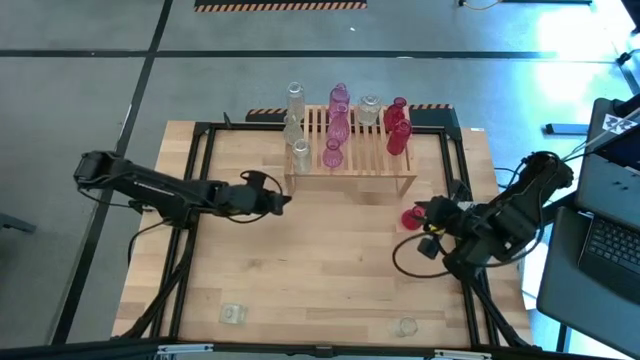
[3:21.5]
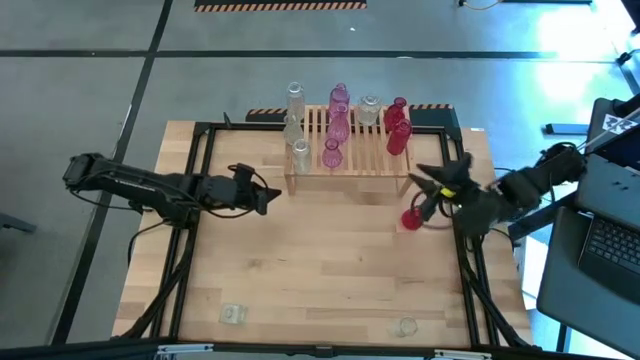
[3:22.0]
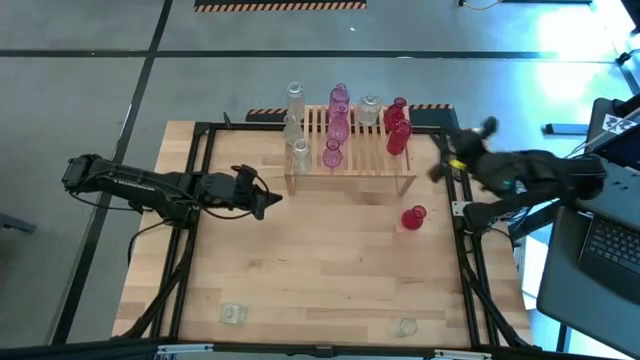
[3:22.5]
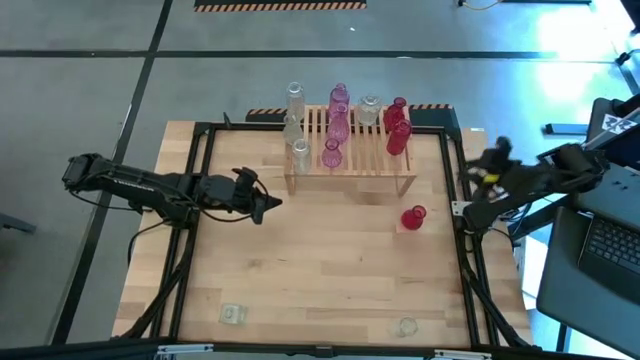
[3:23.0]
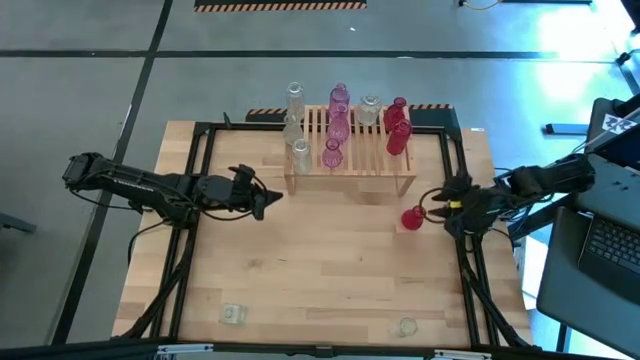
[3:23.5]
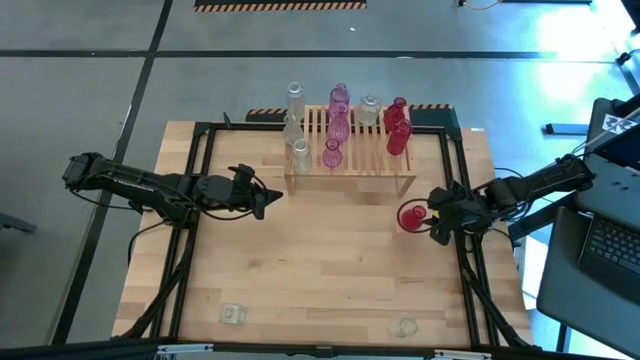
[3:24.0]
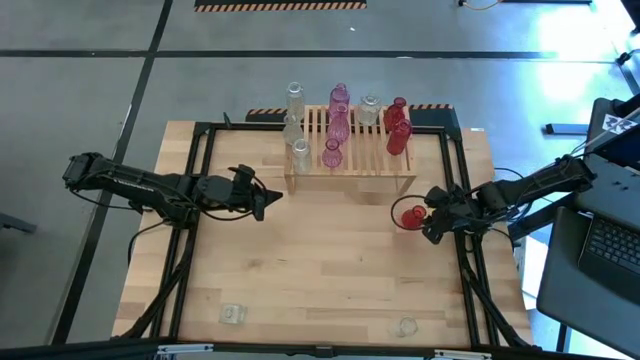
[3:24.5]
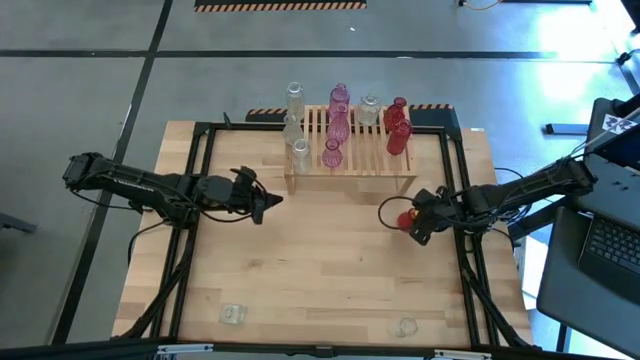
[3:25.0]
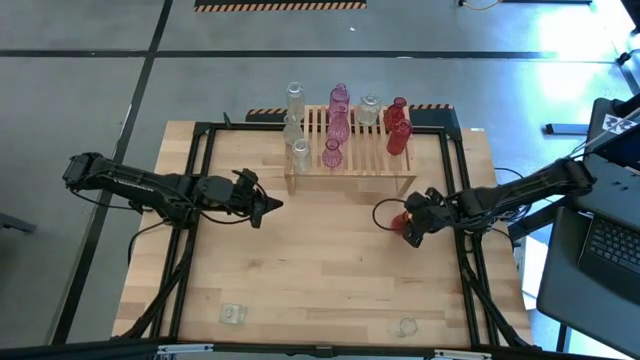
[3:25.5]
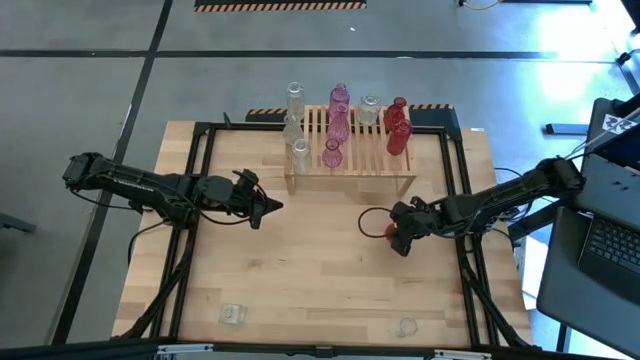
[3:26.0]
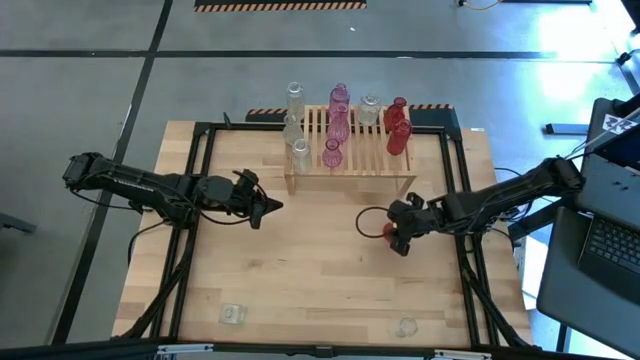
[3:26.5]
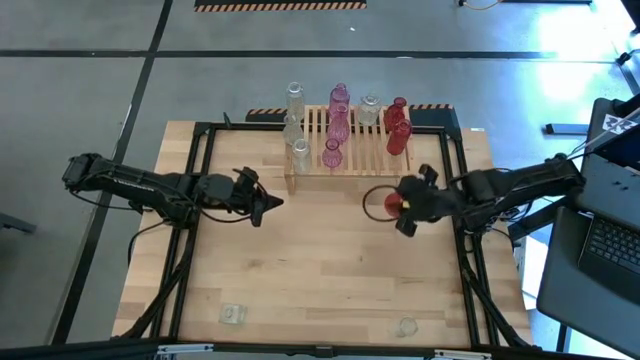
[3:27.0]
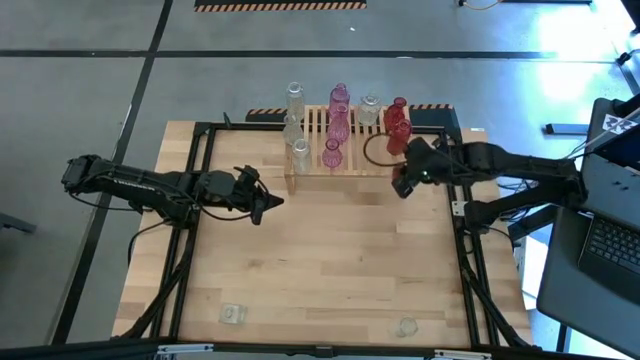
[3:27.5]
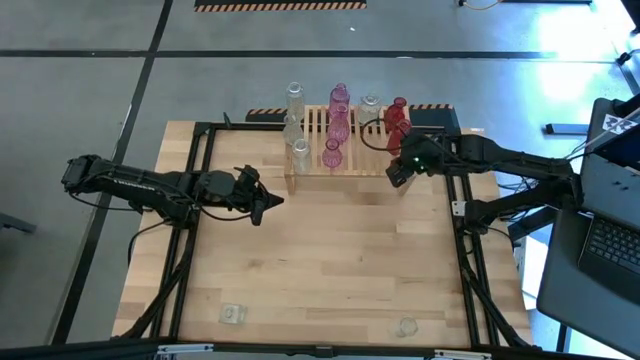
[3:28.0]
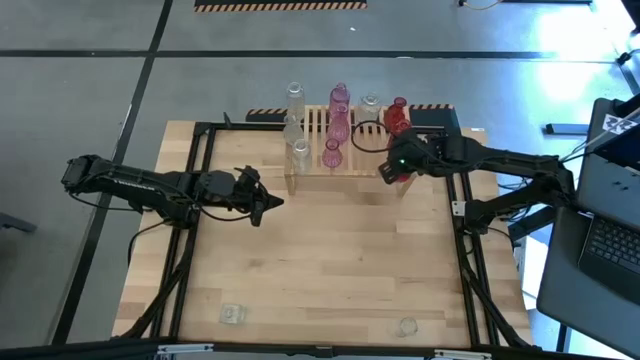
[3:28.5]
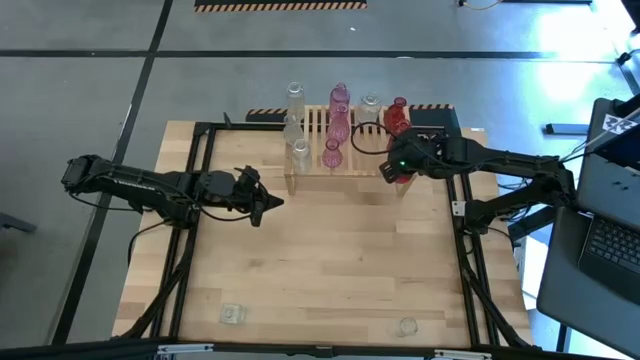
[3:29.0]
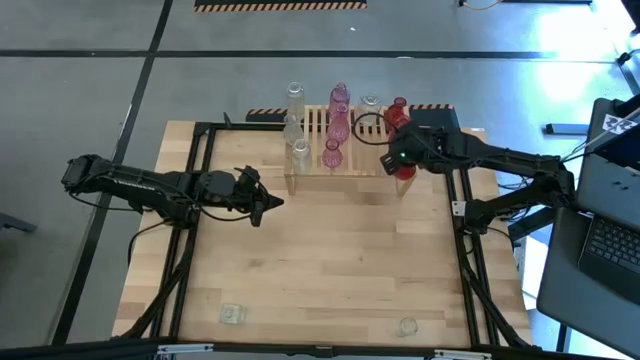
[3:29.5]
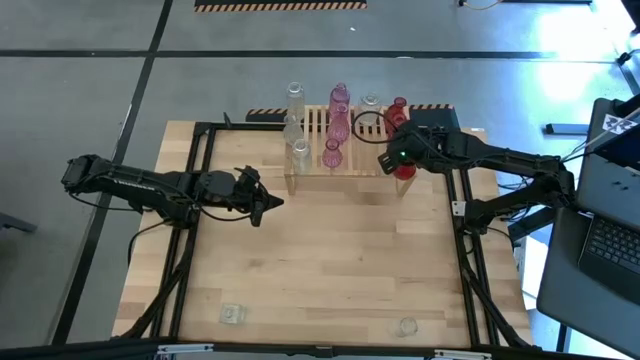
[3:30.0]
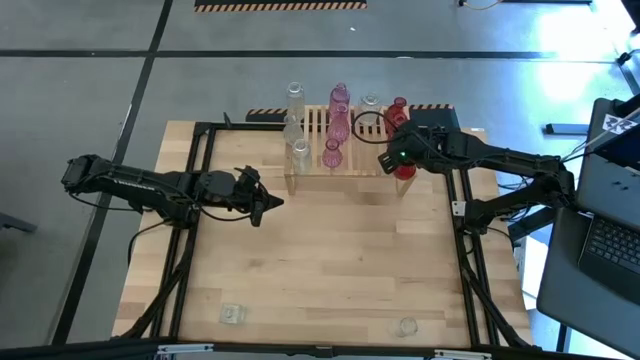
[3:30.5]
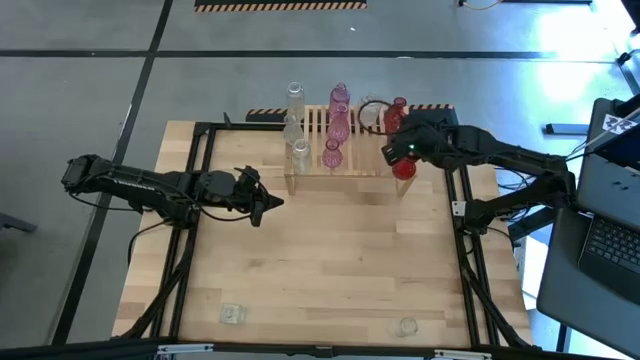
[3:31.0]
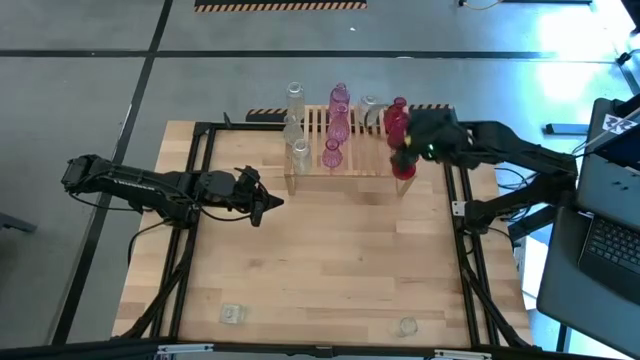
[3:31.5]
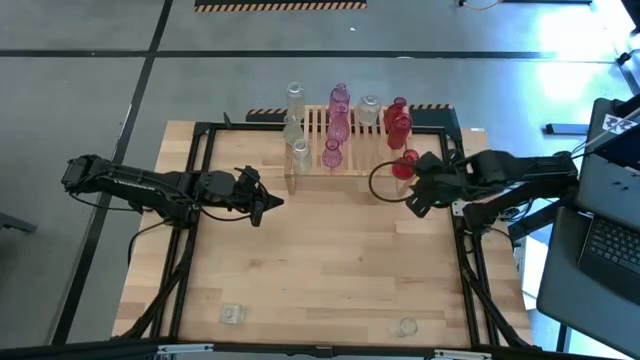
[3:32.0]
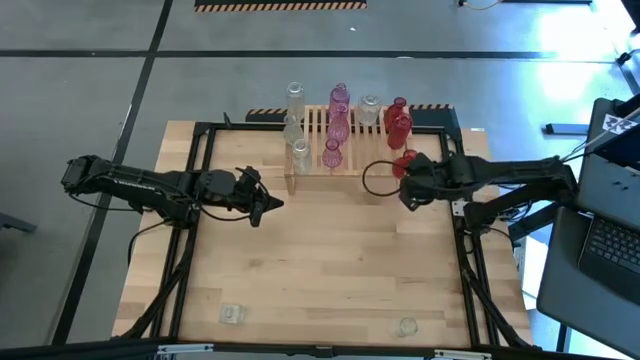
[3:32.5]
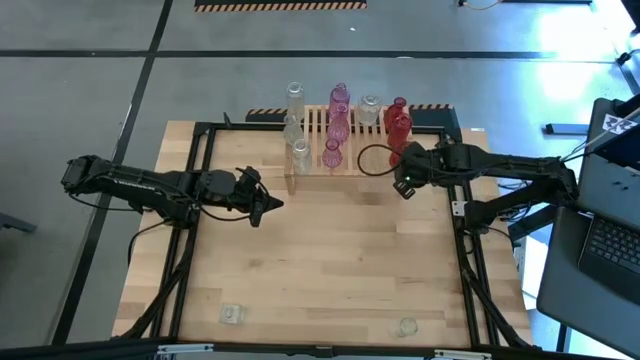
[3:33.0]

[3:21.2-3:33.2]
Task: sort vases onto shelf
Put the red vase on the shelf aligned with the other red vase

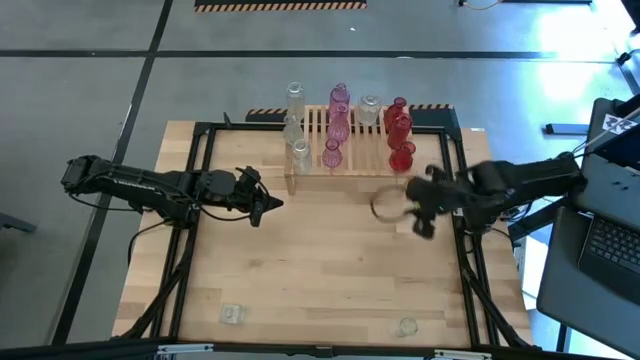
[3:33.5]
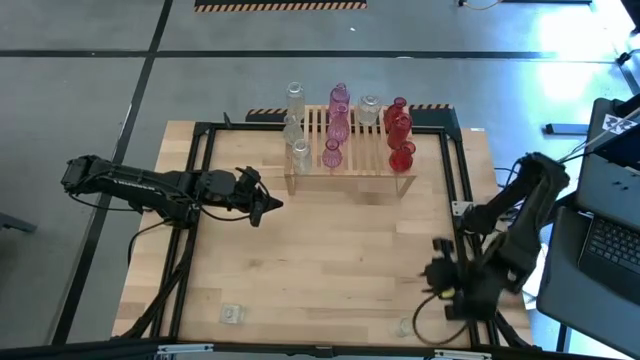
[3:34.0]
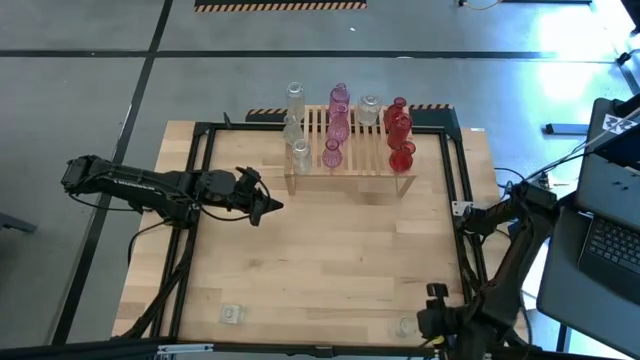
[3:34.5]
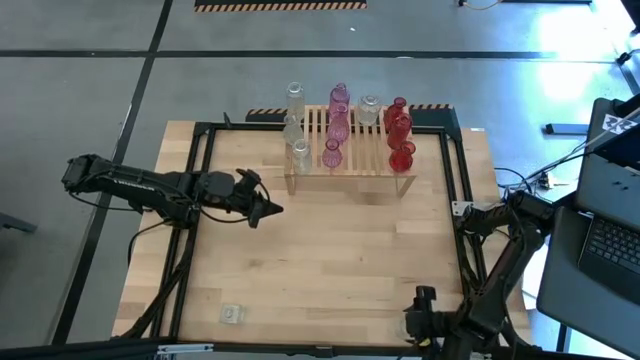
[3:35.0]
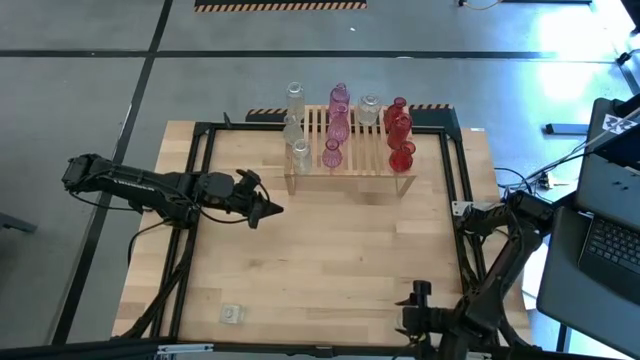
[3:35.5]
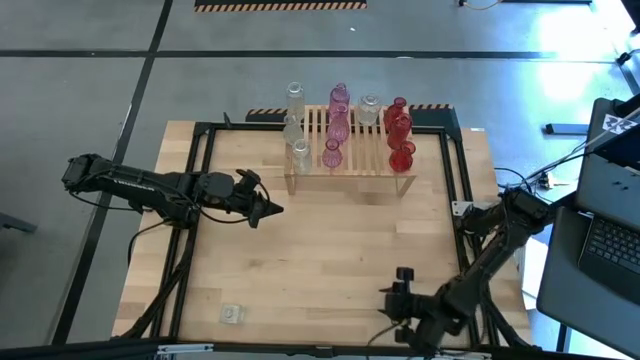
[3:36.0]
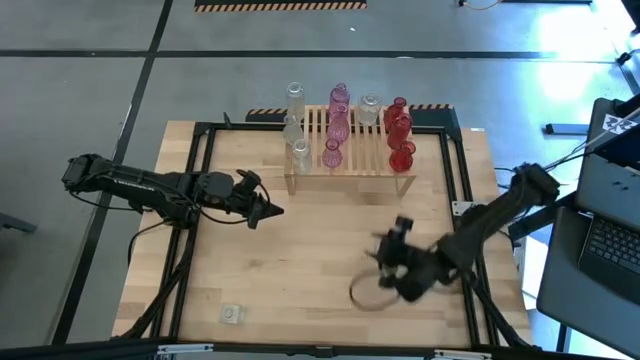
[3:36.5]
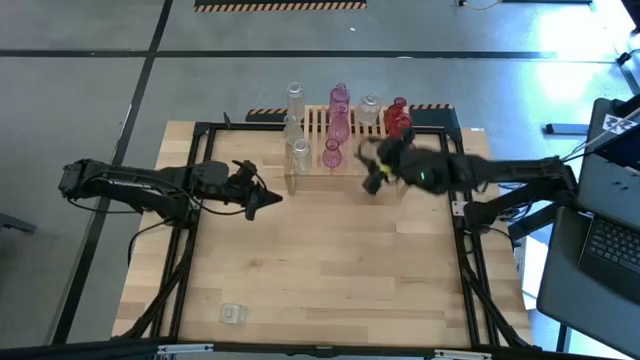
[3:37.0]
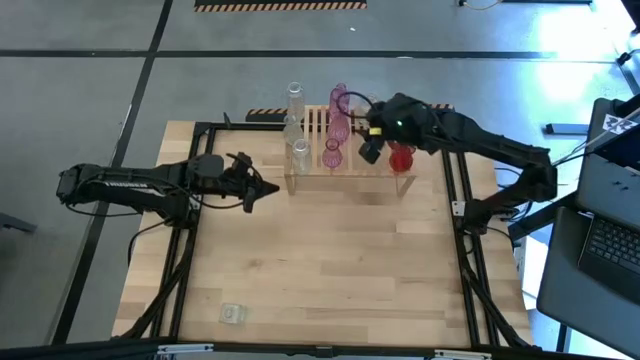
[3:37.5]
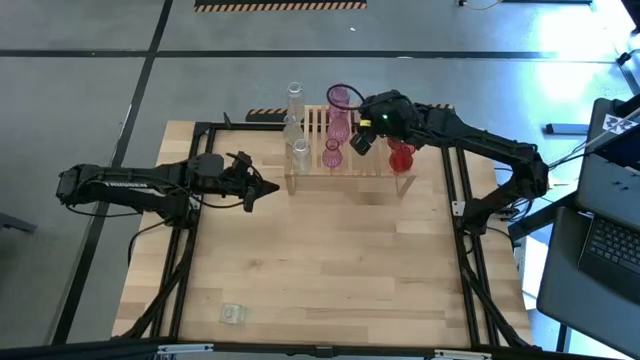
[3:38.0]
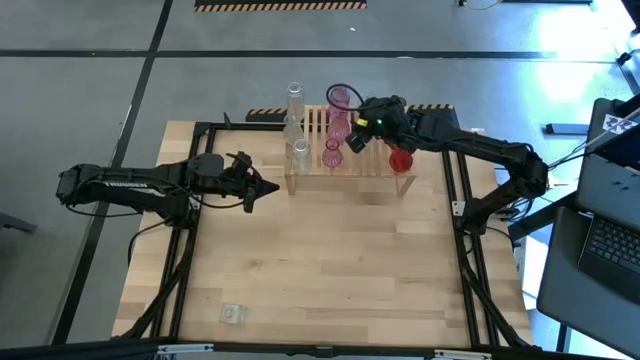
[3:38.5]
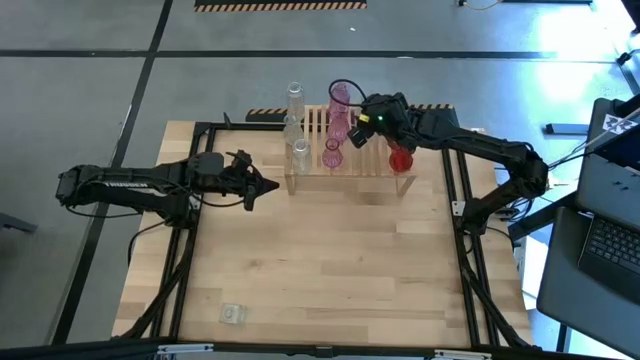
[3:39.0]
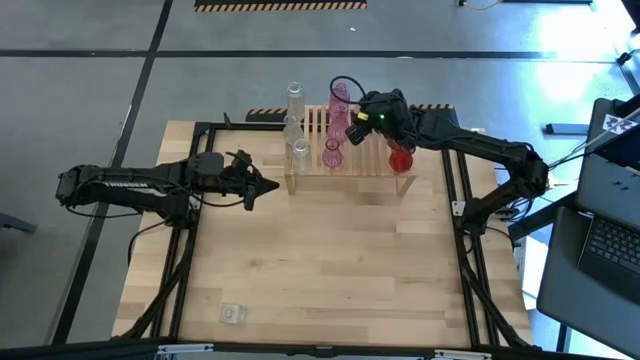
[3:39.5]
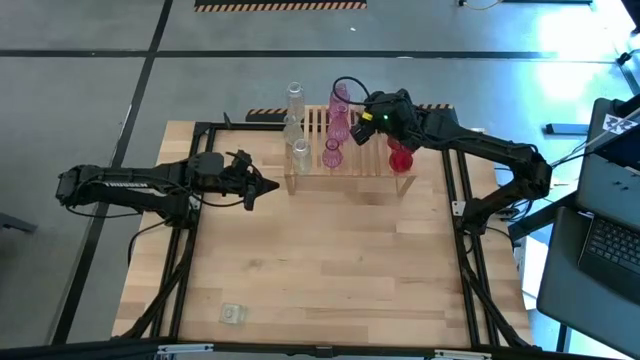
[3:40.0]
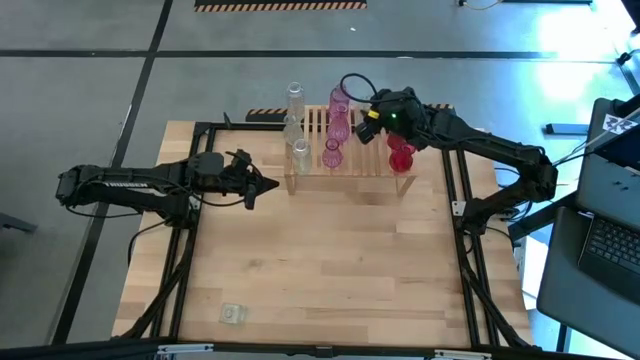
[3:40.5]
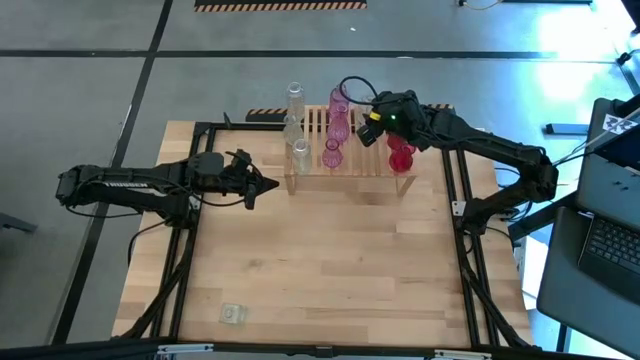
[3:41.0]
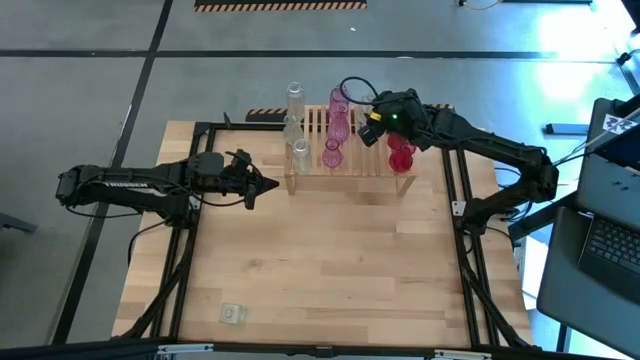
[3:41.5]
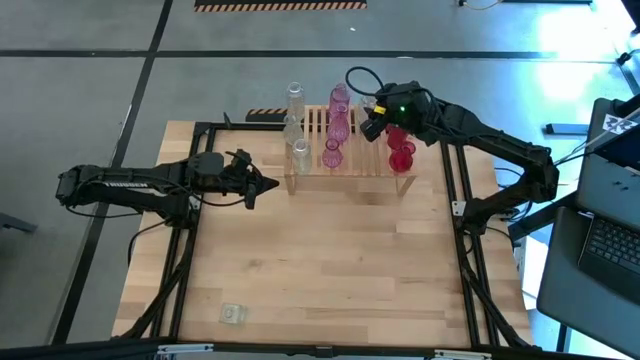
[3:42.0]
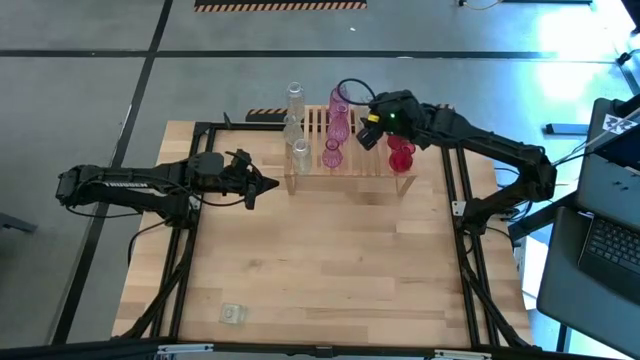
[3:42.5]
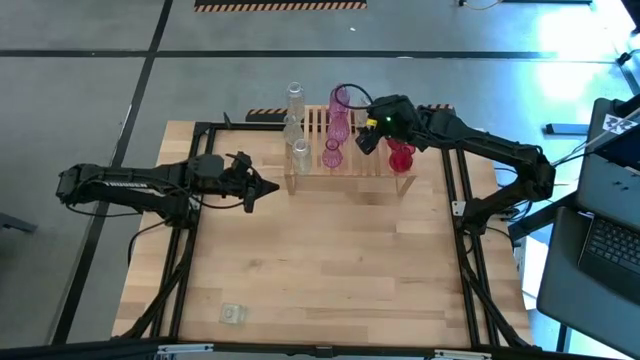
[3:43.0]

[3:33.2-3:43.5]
Put the transparent vase on the shelf aligned with the other transparent vase
